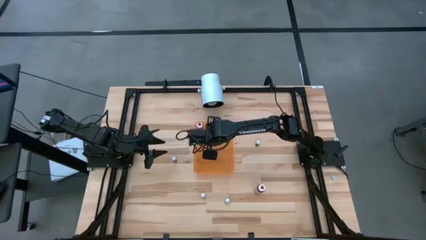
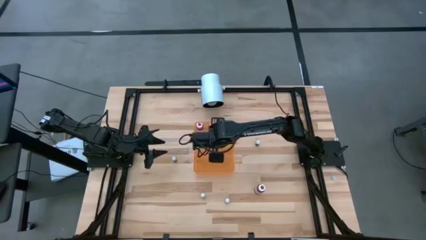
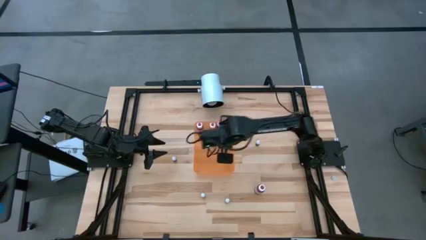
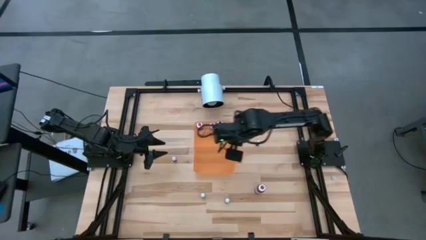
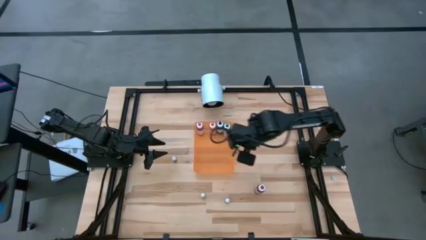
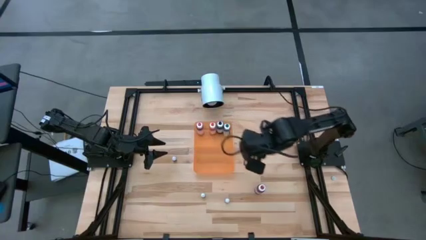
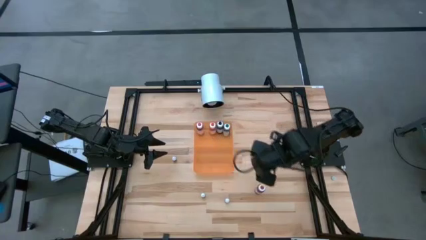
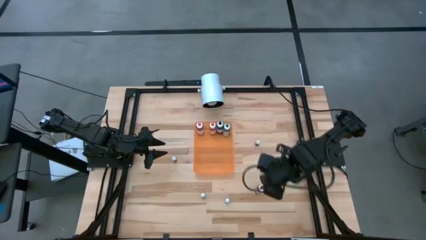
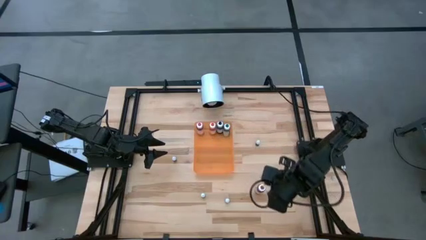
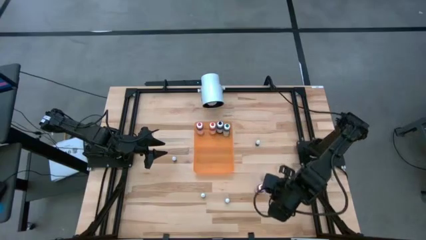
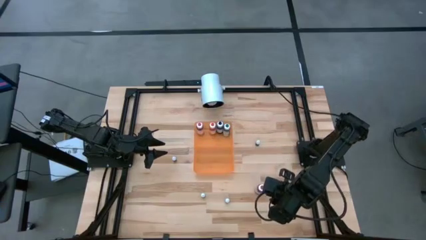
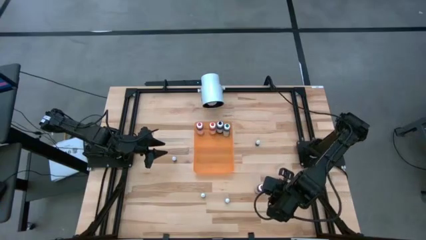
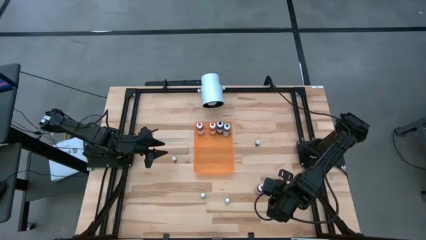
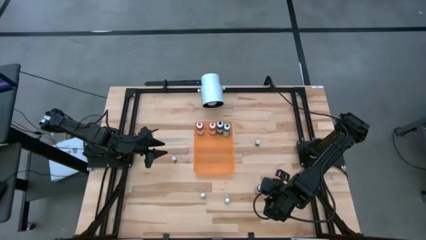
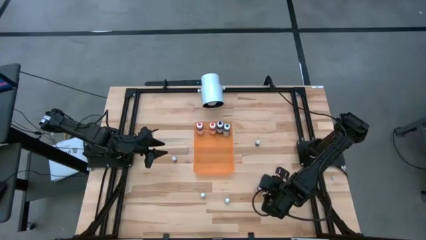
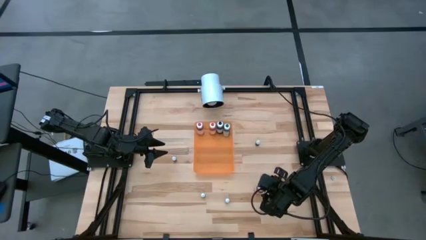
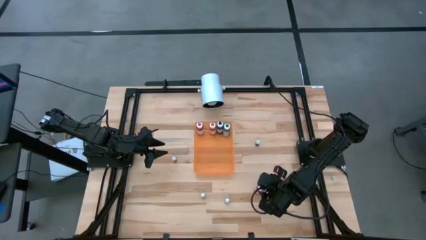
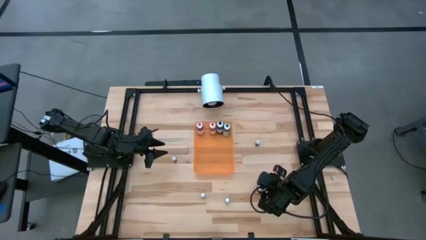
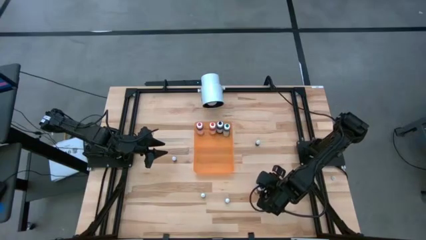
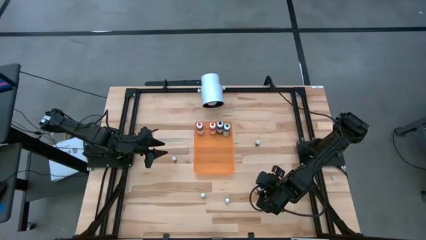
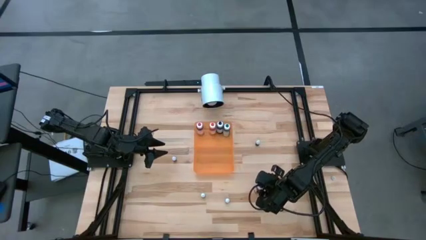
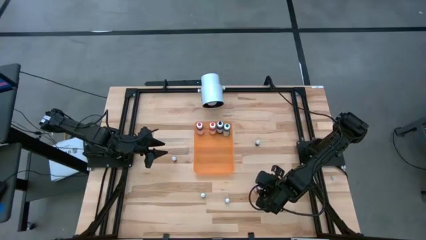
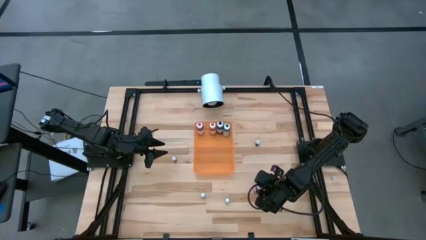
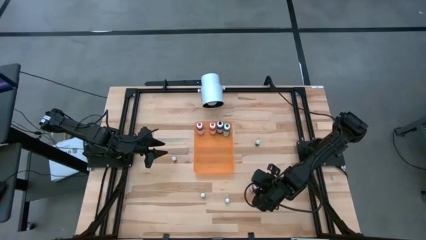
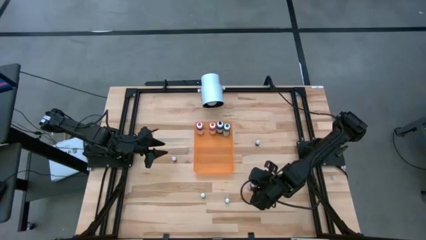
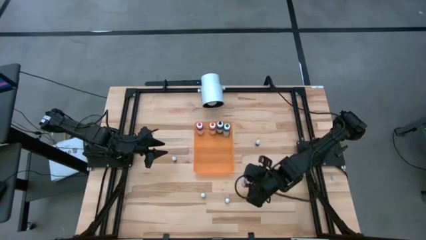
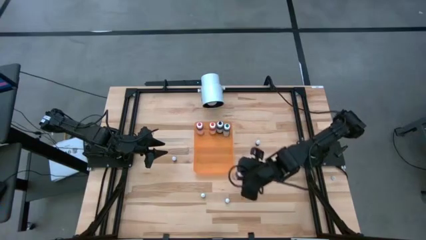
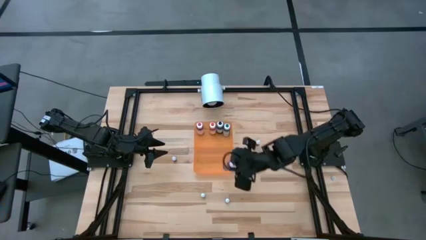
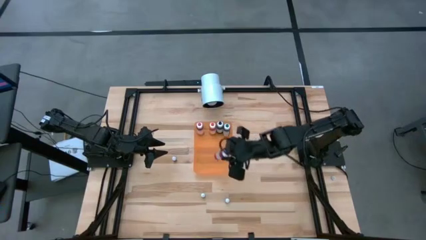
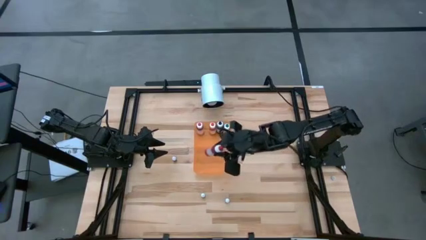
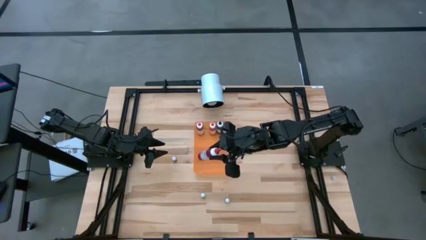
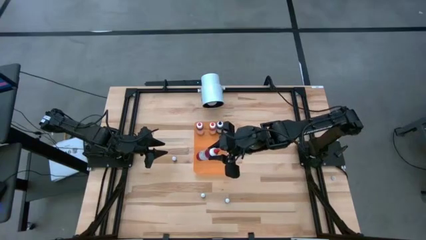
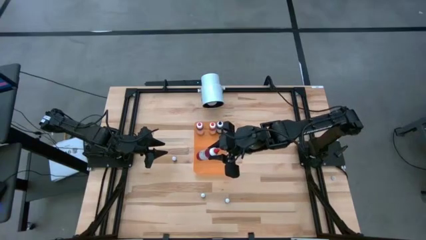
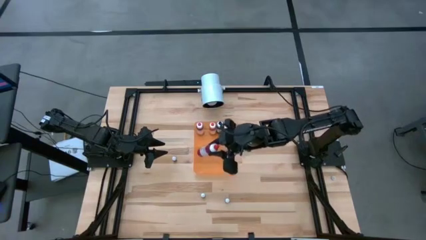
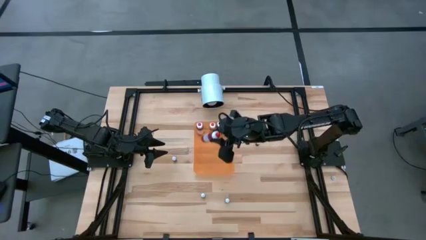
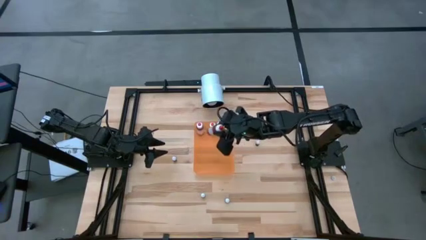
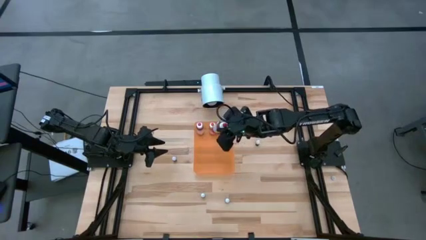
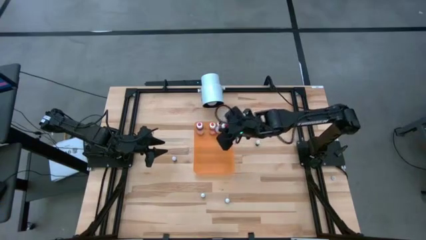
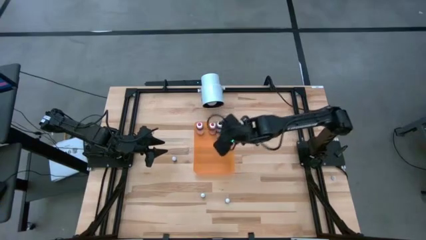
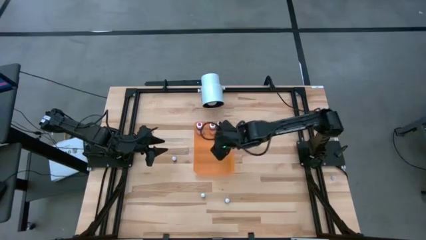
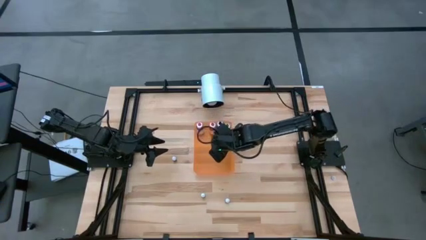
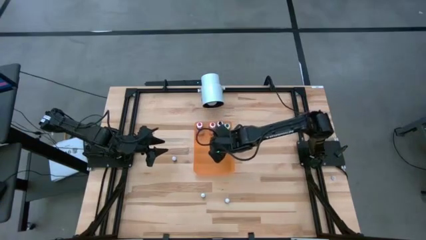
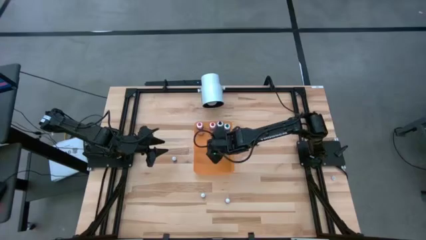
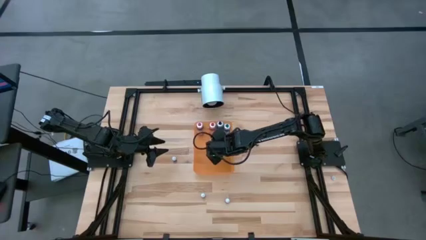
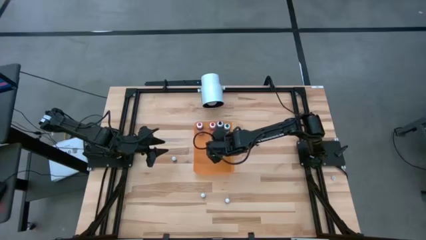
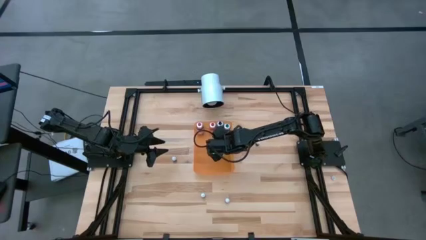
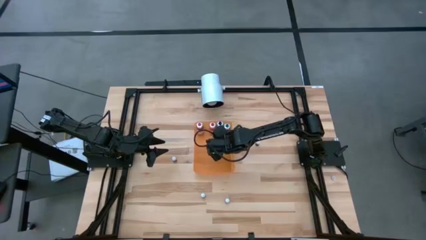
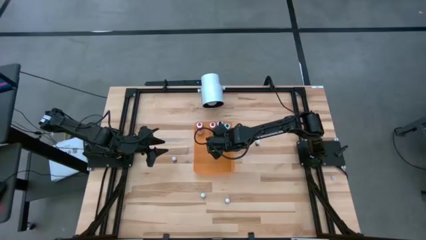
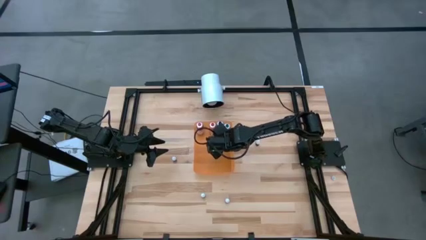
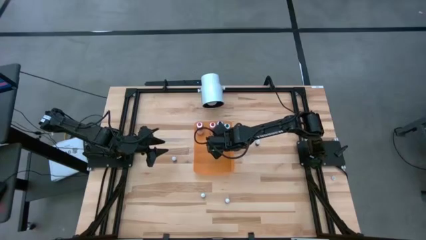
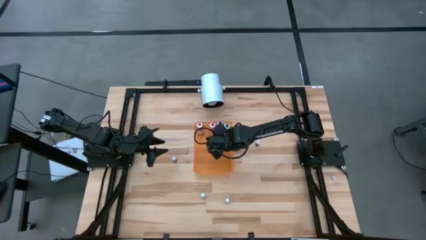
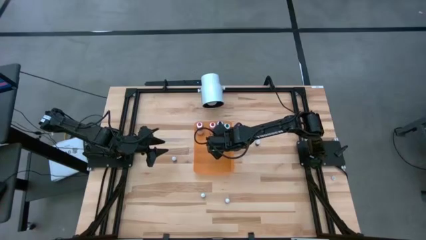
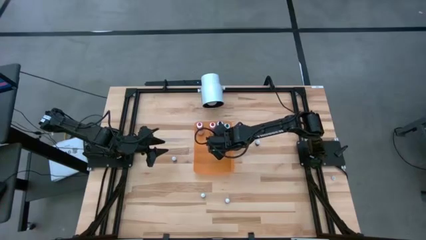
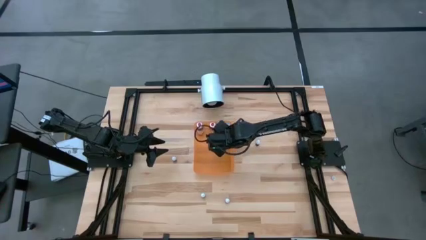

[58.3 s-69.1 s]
Task: Pick & Place food coloring
Put the large red food coloring bottle into the bin
